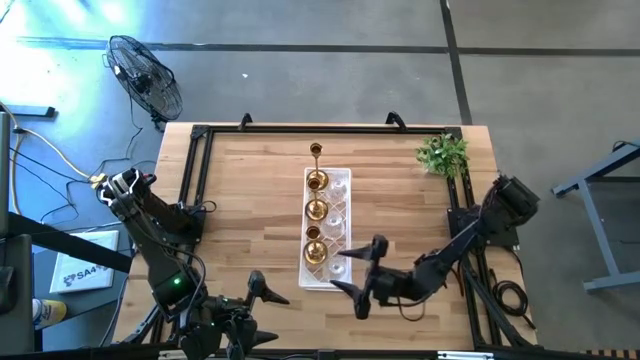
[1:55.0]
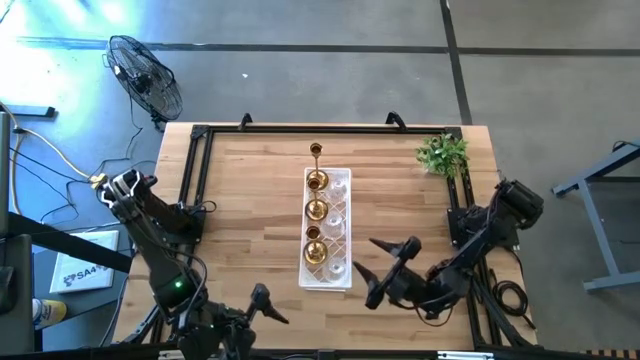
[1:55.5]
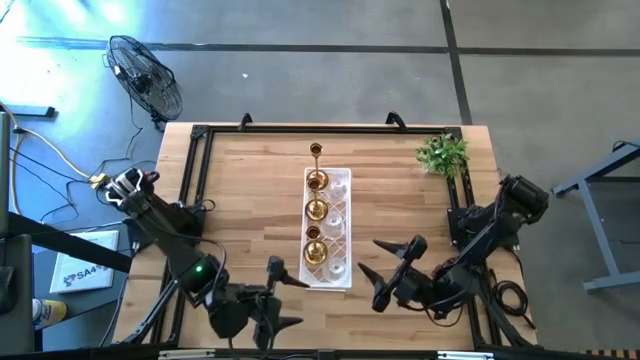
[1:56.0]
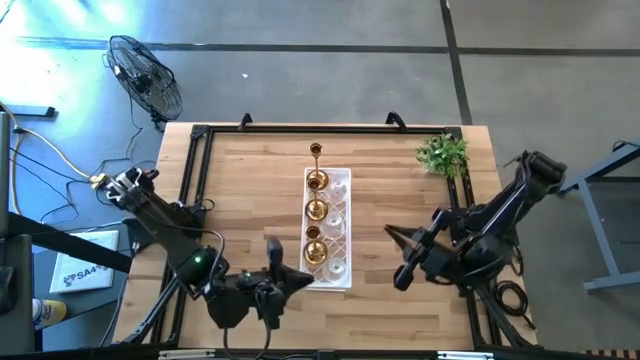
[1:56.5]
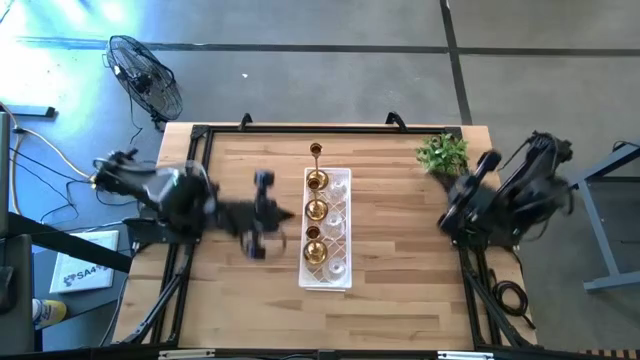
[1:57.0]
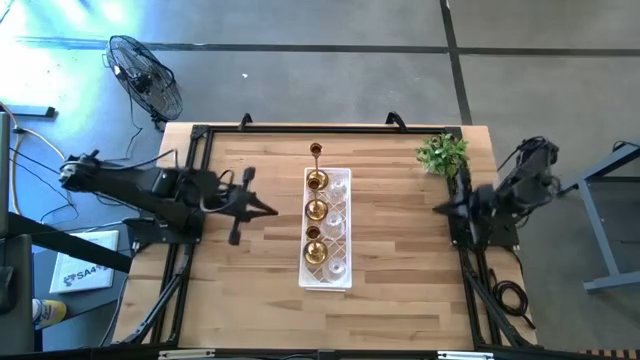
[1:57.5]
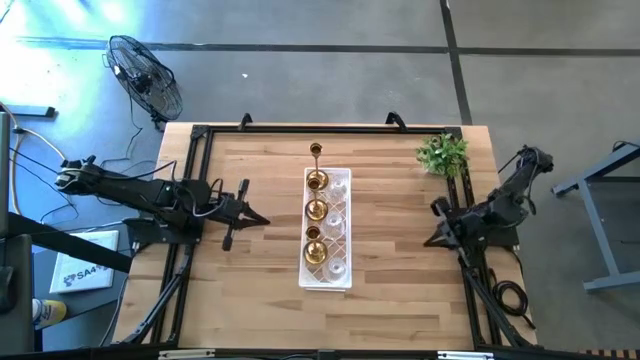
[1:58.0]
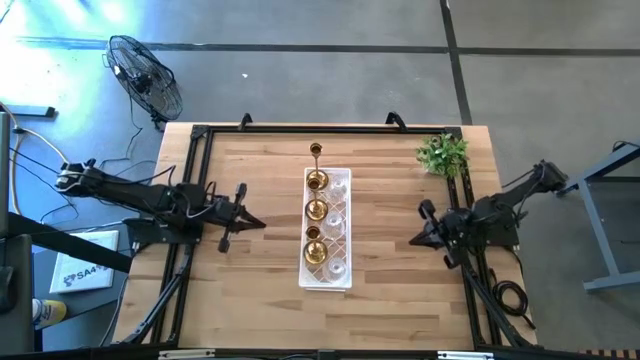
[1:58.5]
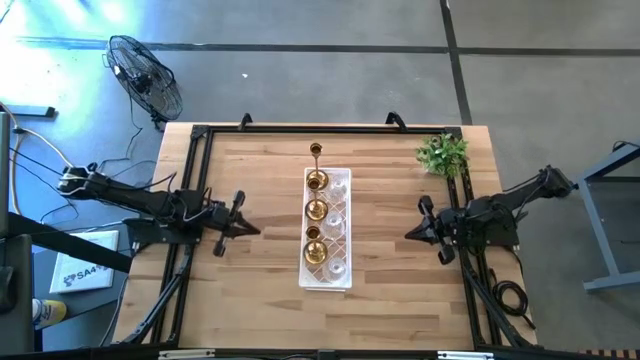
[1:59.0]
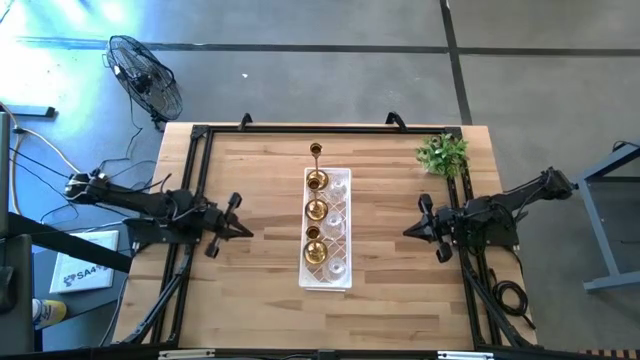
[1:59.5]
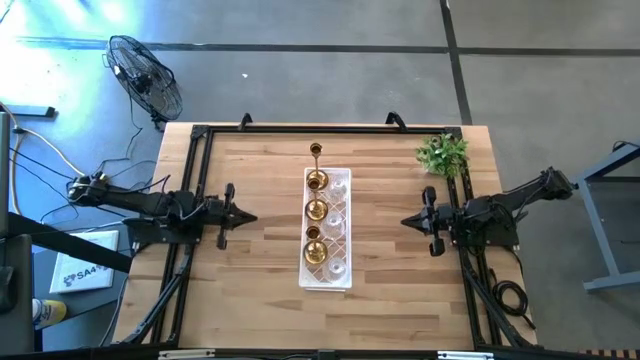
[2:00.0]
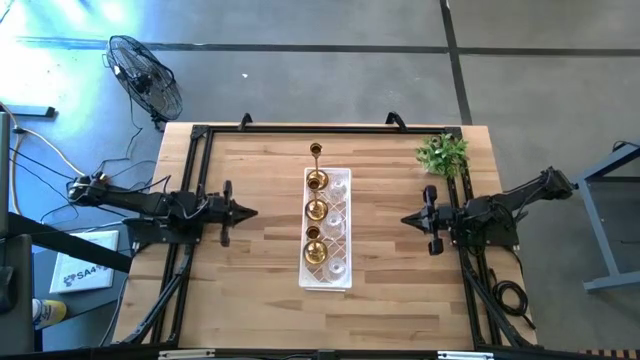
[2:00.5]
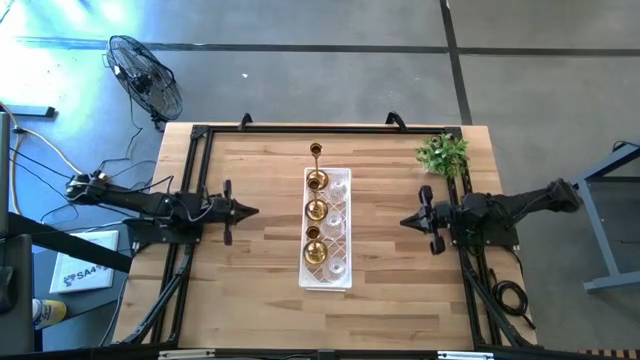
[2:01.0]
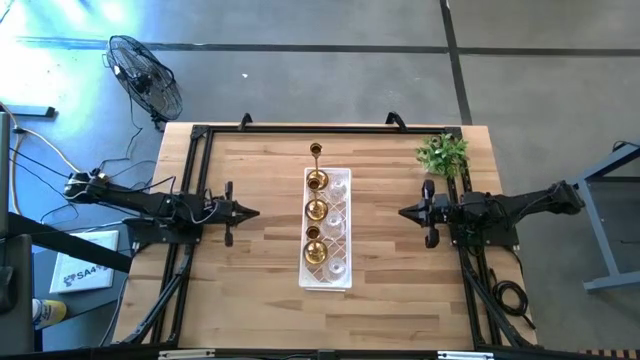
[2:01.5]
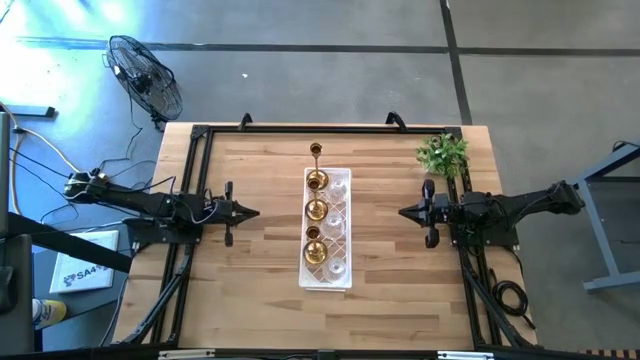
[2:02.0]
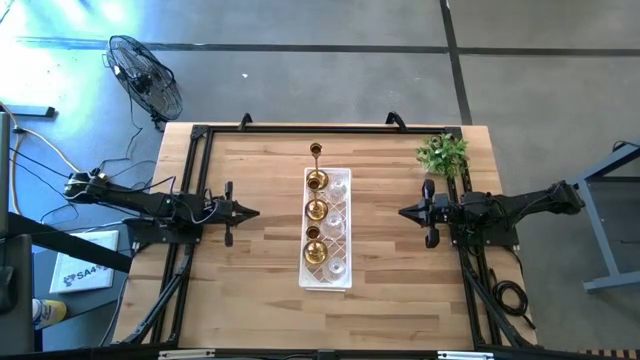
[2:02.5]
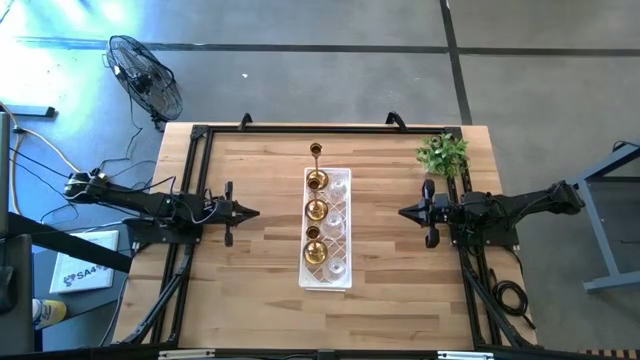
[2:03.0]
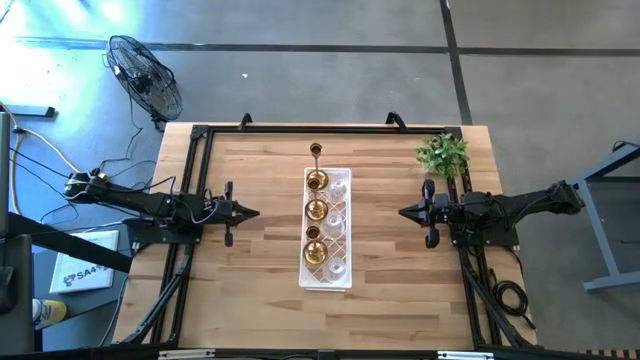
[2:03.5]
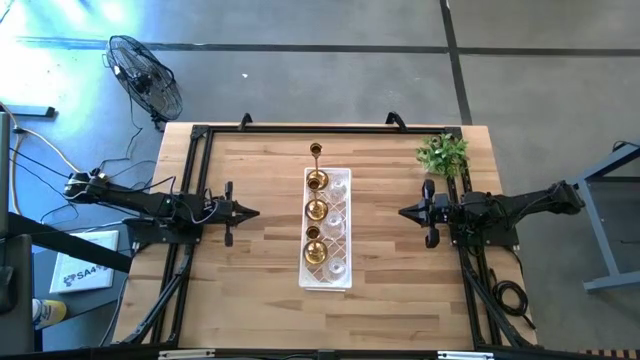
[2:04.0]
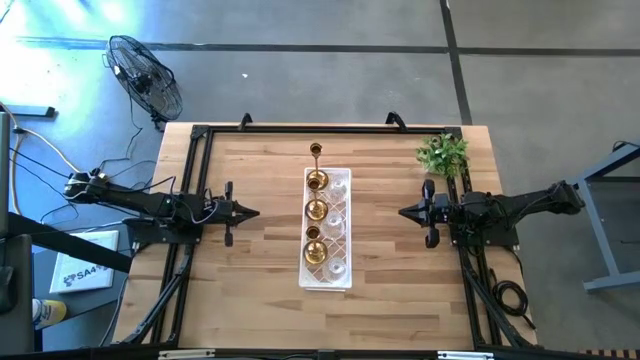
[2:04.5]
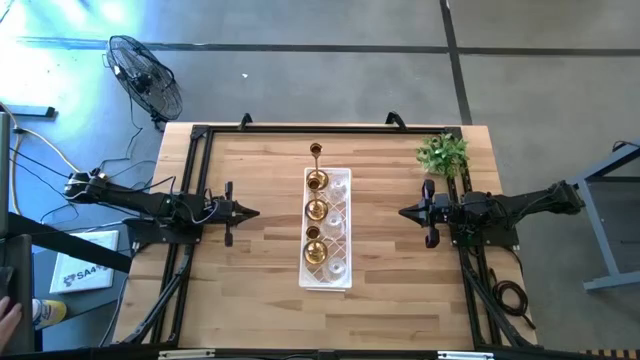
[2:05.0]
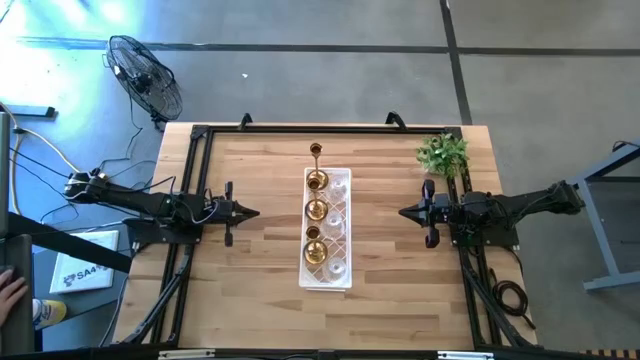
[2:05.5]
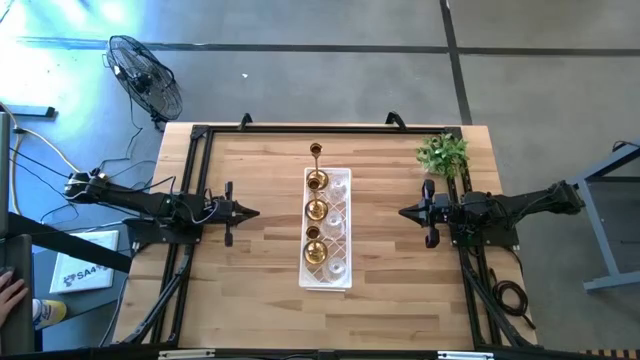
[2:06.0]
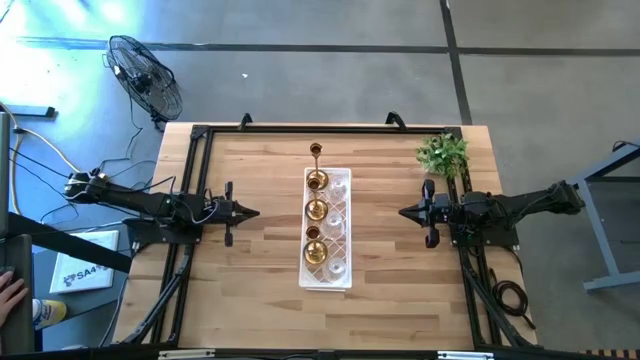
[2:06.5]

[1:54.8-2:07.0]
Task: Pick & Place candle stick holders
Return to Home Position

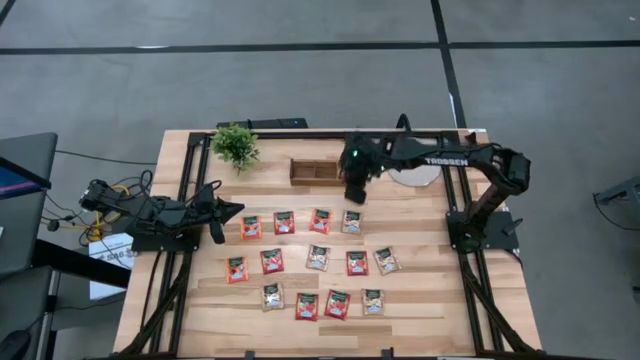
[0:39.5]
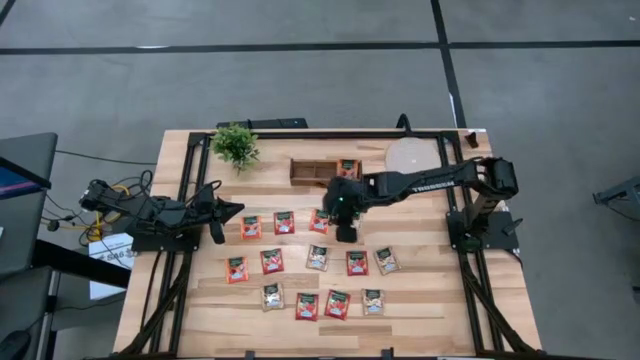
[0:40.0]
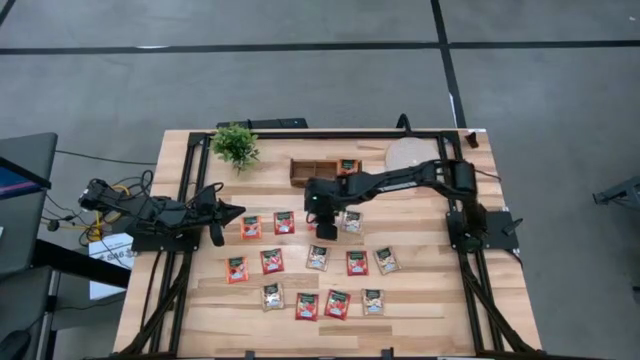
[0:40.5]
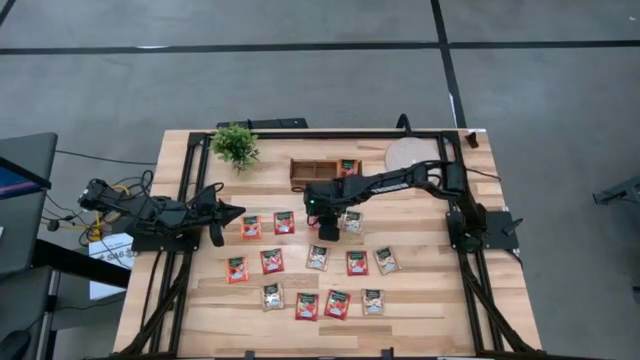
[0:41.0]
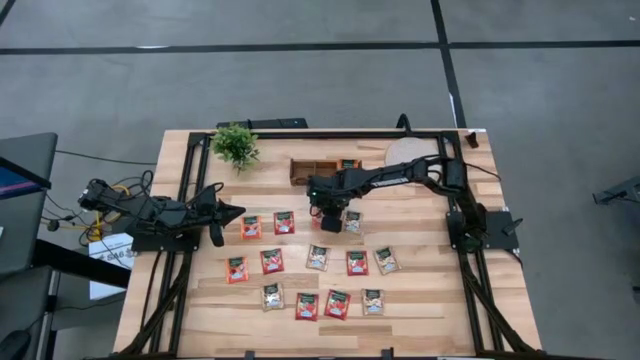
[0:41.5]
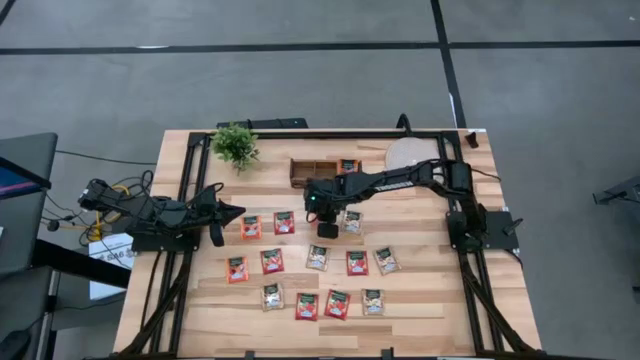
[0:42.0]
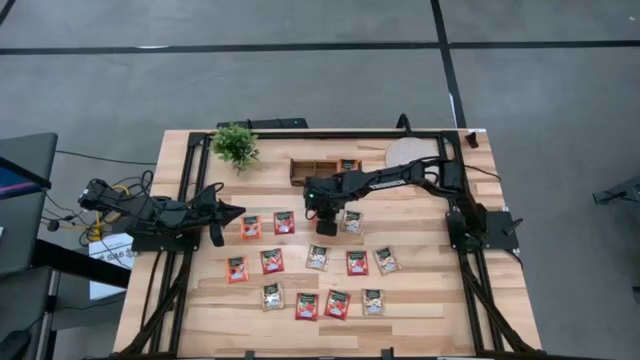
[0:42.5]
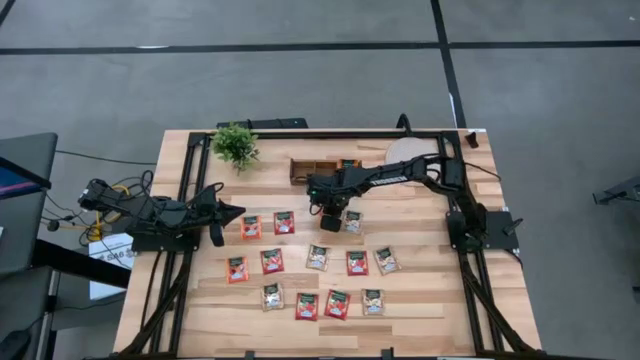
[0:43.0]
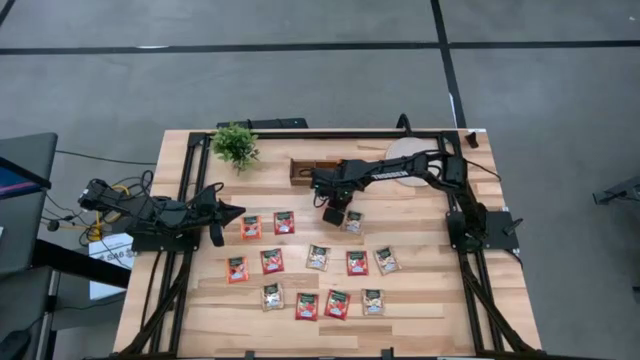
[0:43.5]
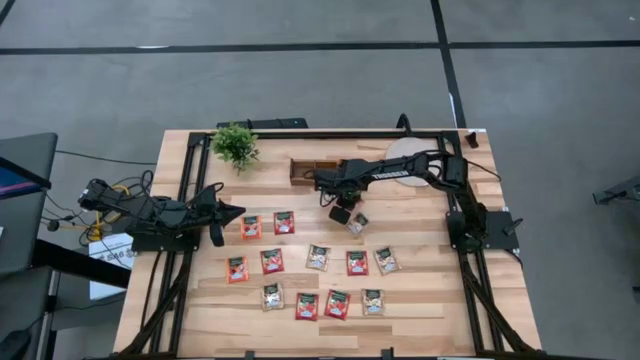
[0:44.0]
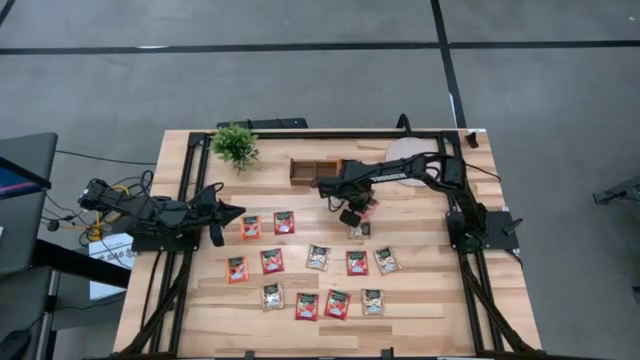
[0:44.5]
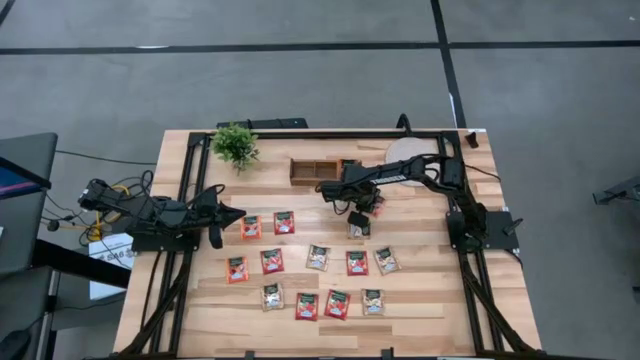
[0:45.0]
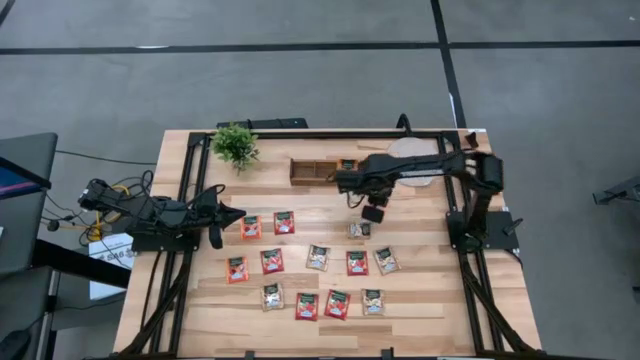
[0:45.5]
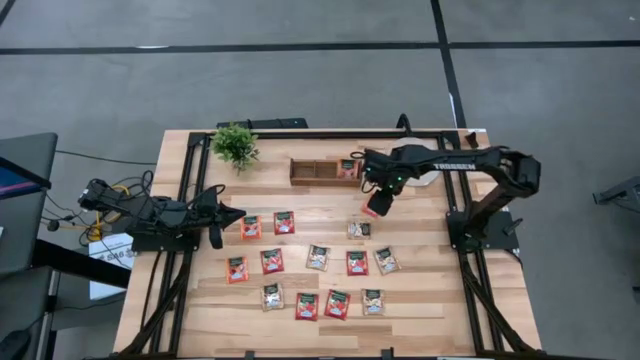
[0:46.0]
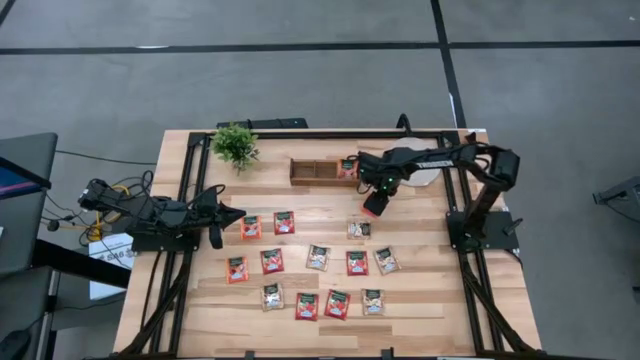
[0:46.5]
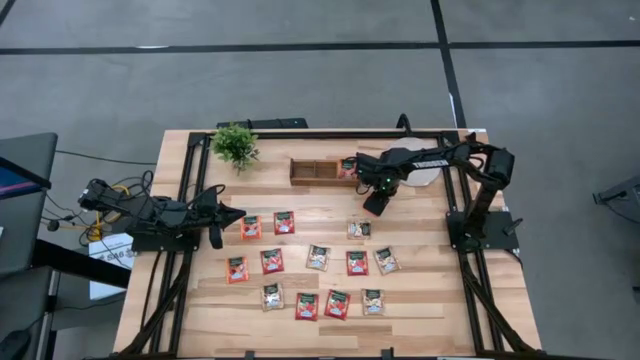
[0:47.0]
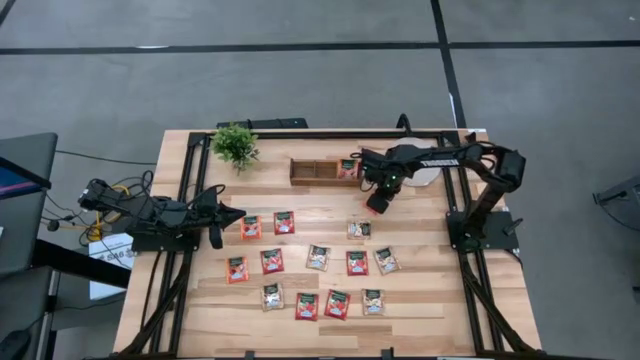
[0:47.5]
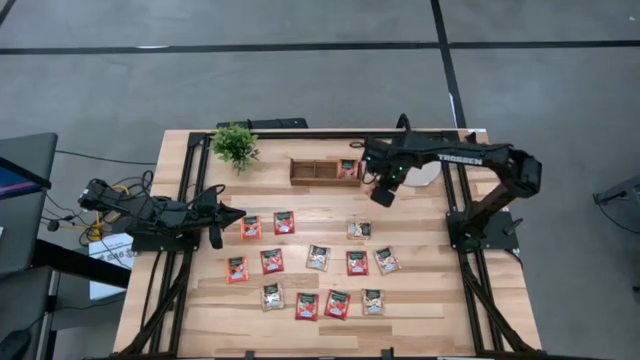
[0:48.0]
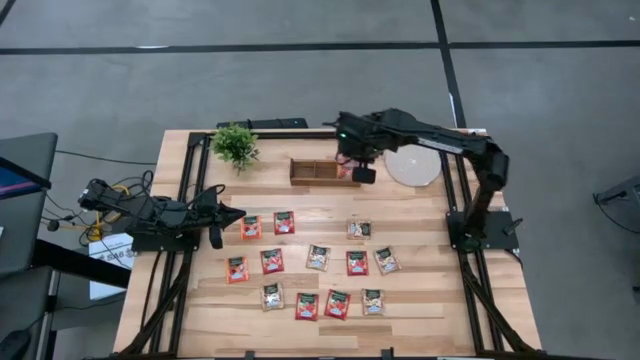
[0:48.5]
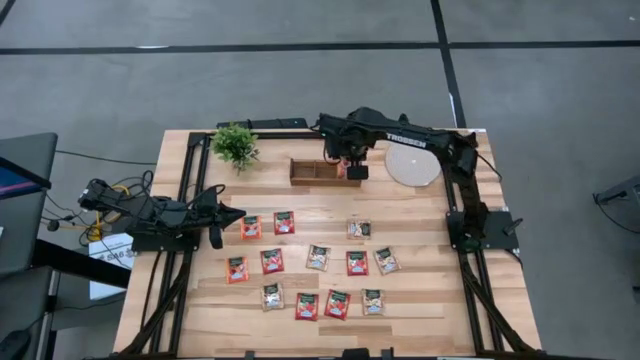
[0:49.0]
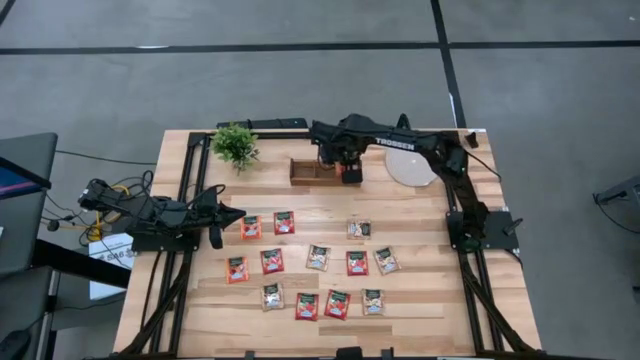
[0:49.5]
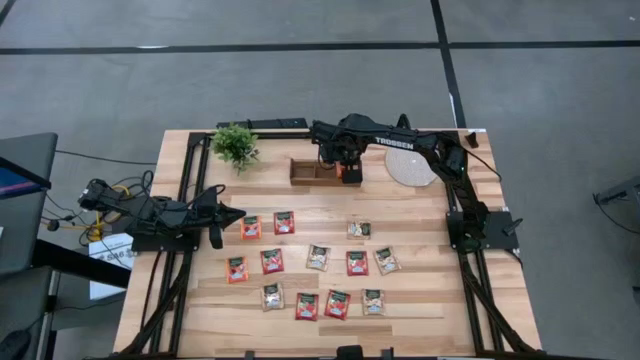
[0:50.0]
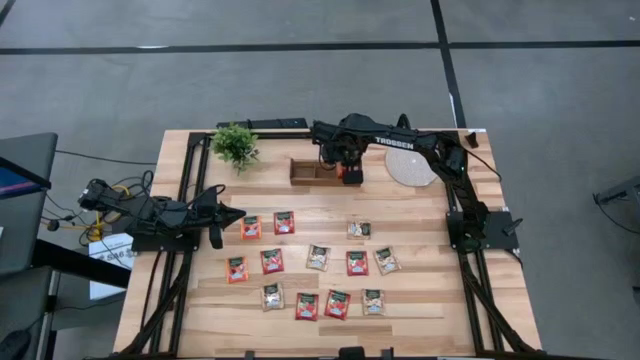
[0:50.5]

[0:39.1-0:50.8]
Task: Pick & Place Tea
Put the right orange tea bag into the right section of the wooden organizer
